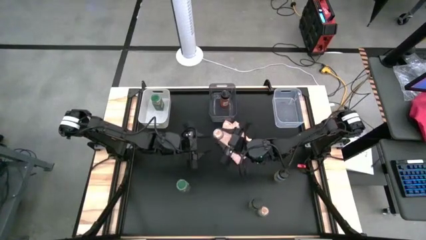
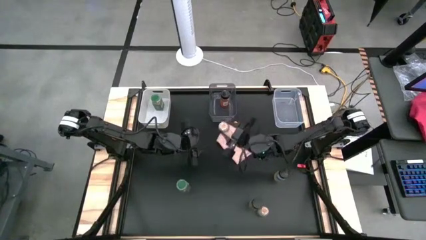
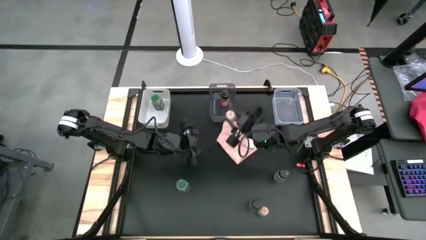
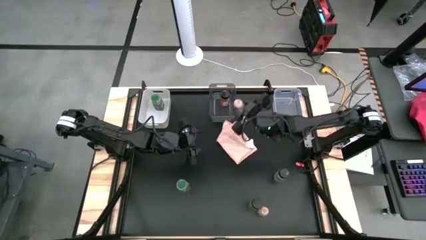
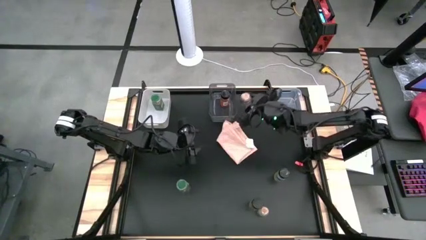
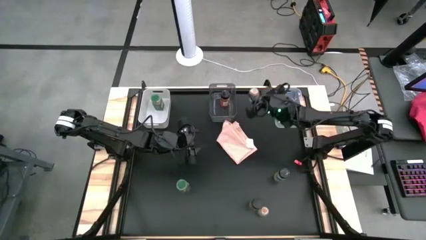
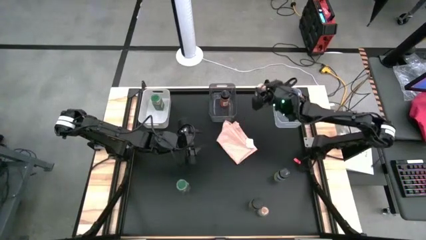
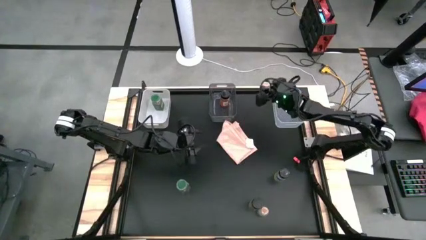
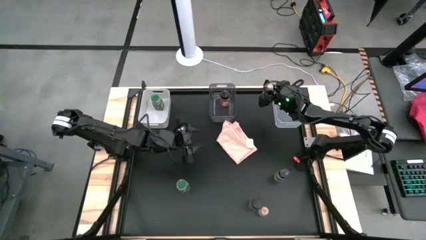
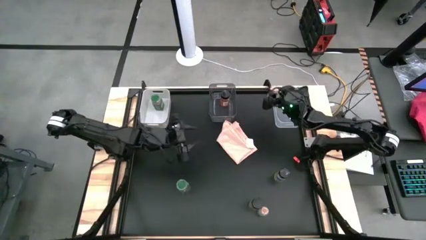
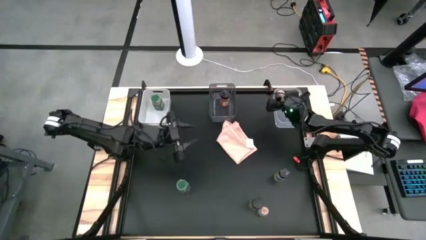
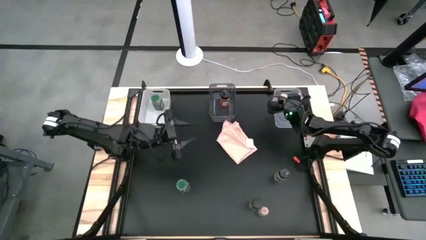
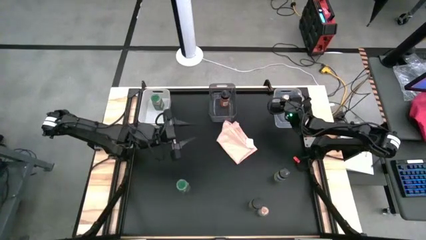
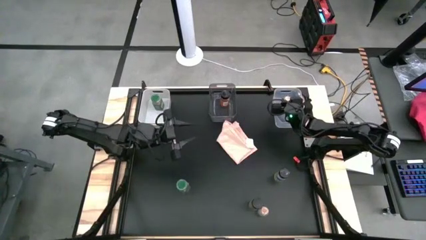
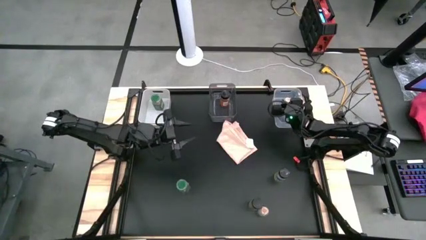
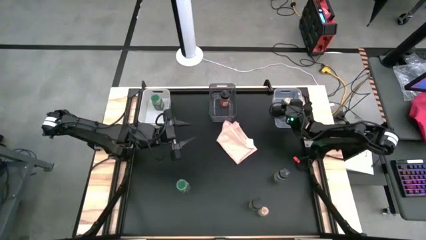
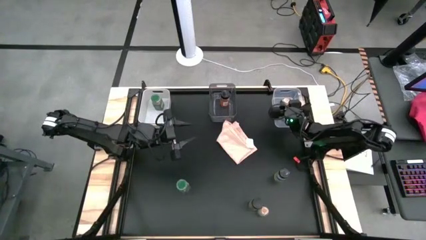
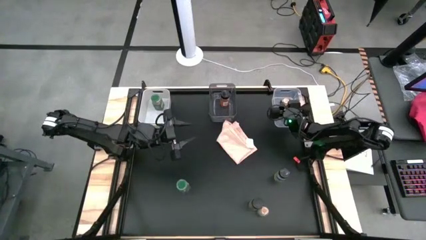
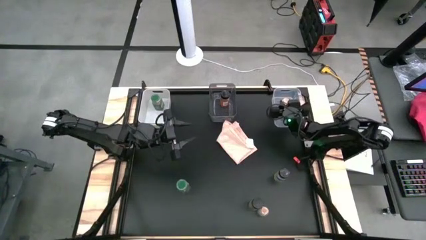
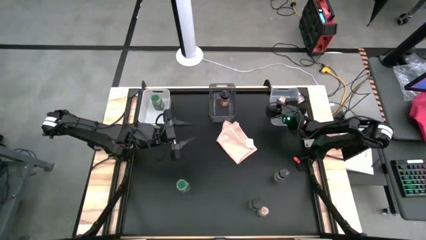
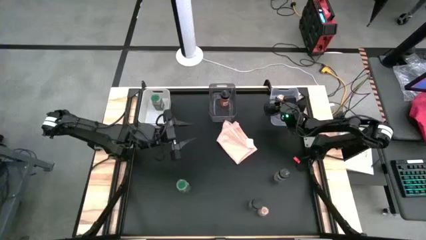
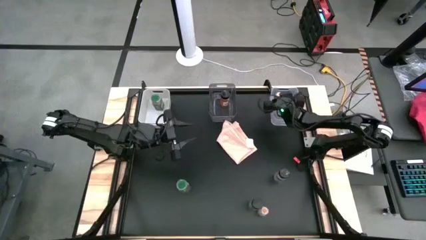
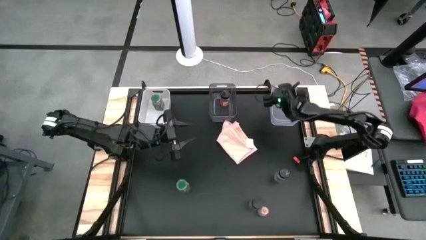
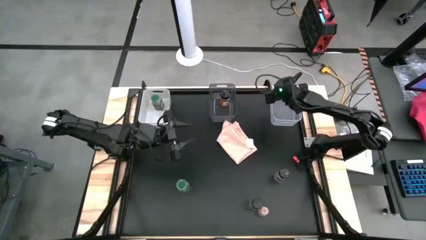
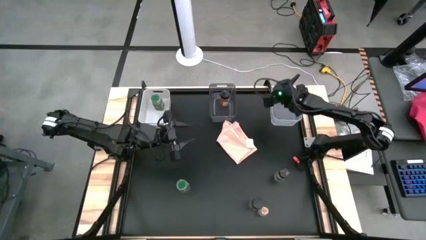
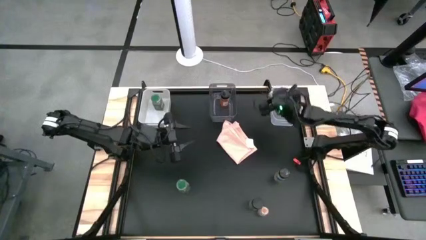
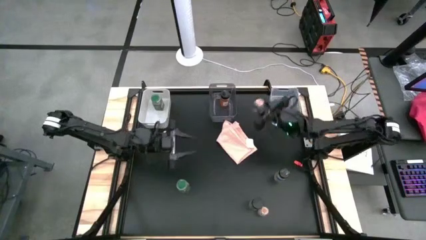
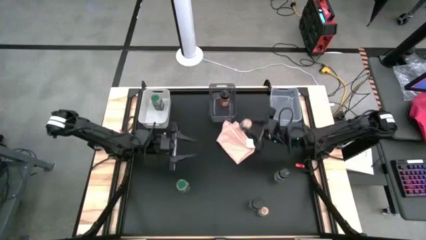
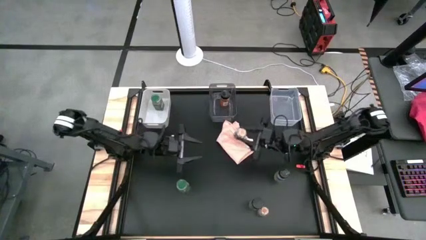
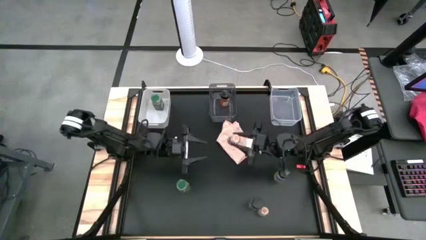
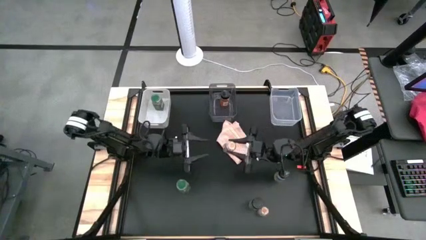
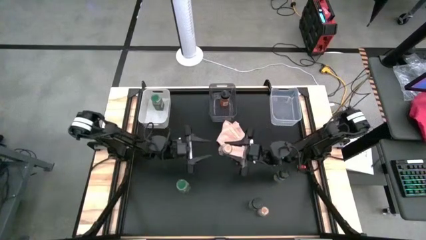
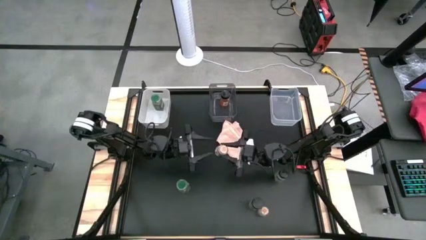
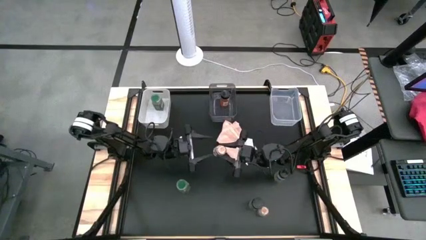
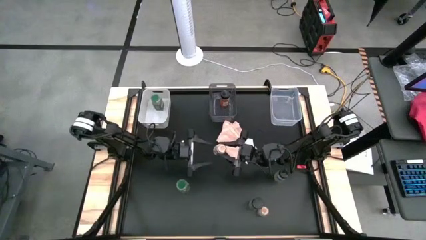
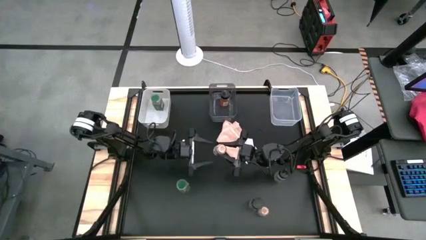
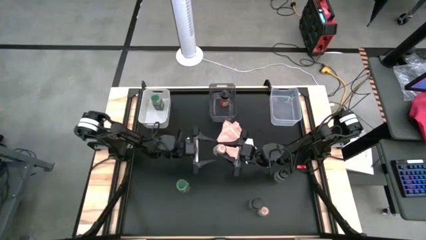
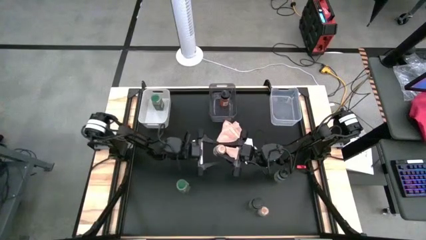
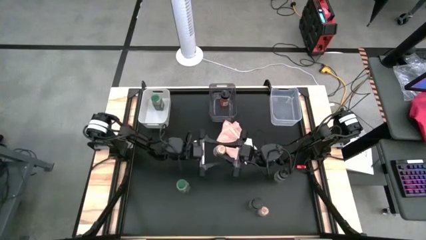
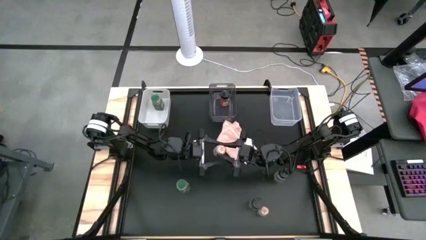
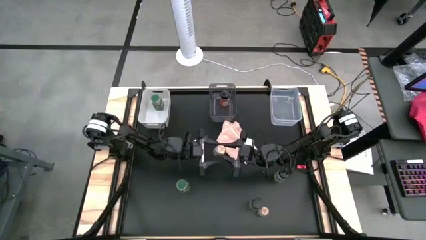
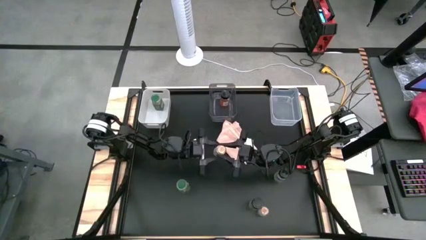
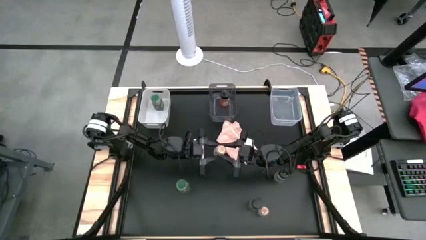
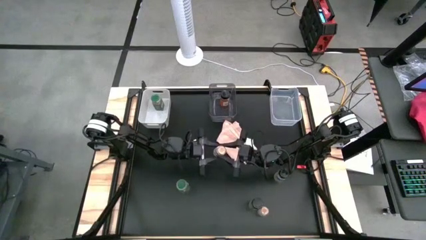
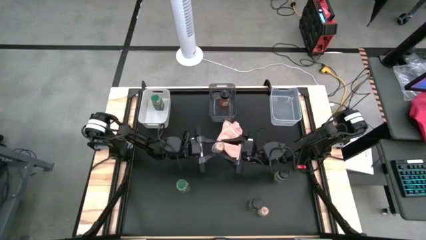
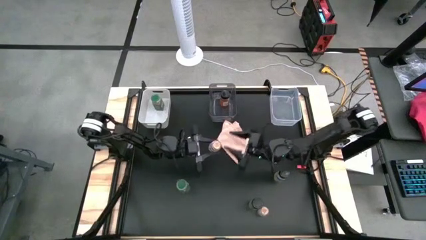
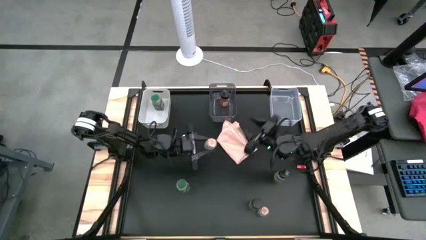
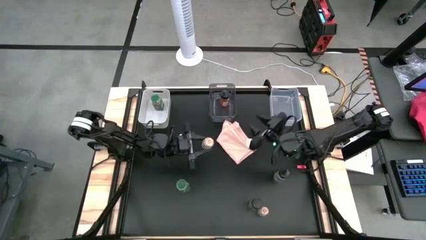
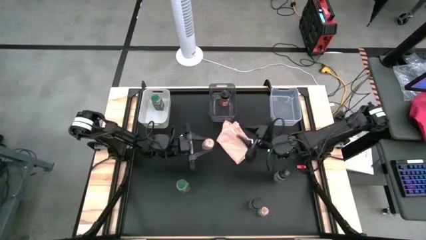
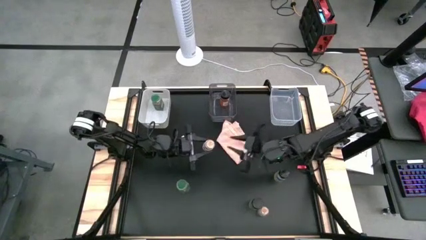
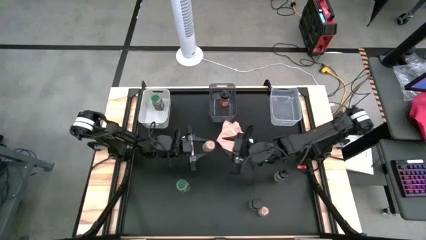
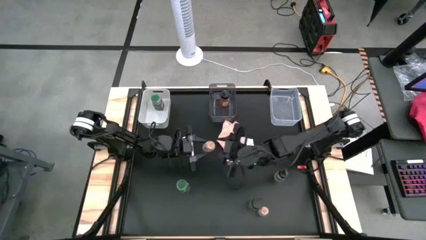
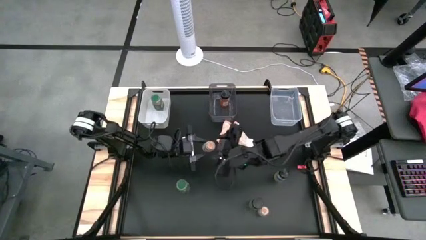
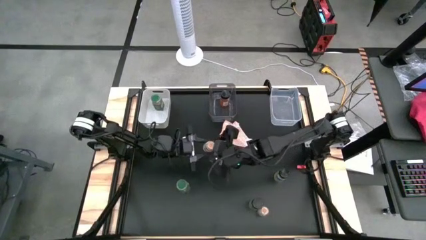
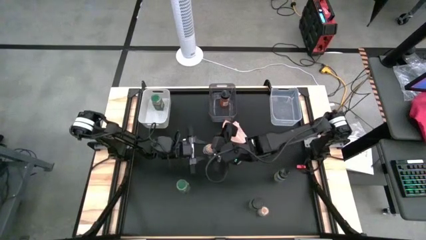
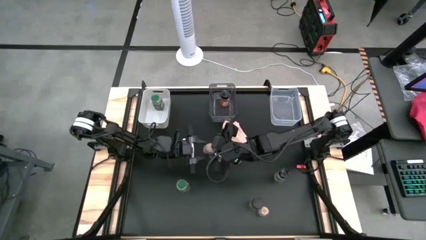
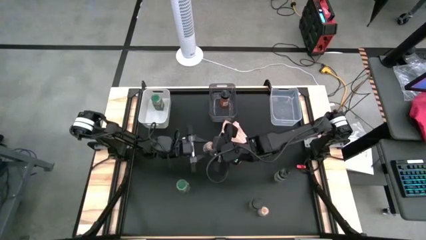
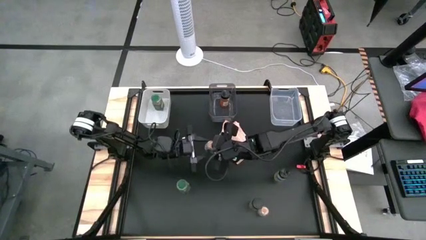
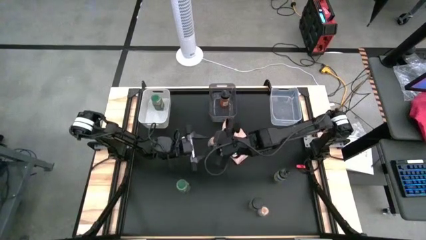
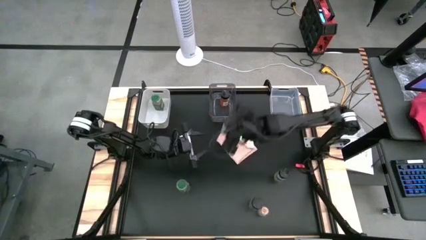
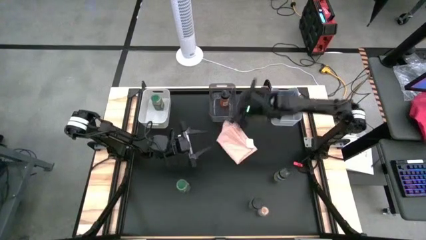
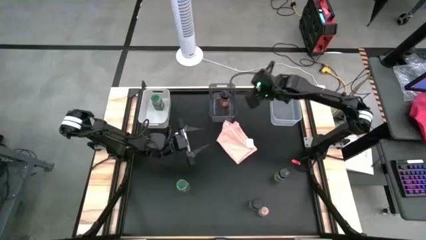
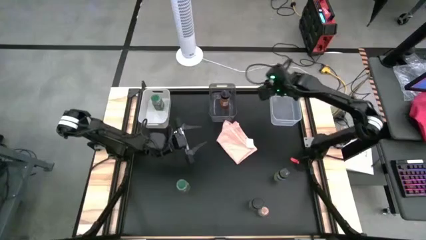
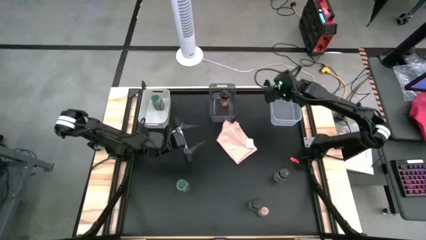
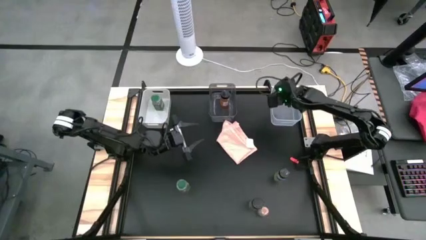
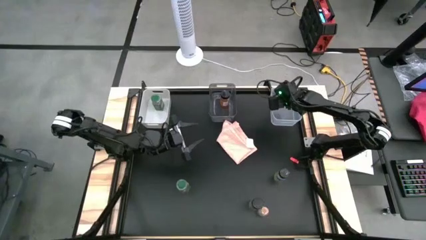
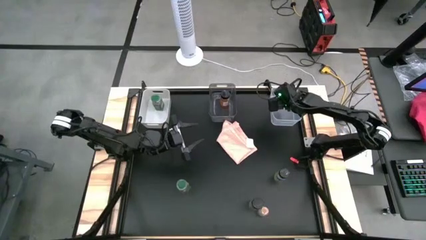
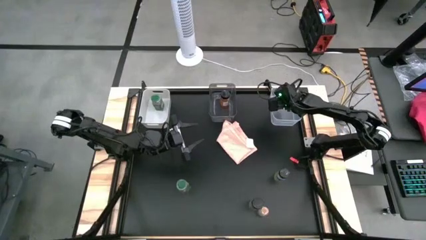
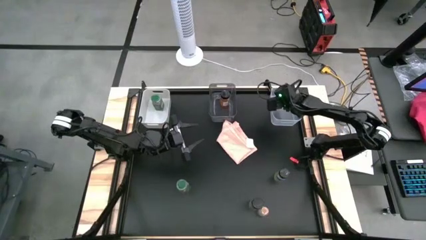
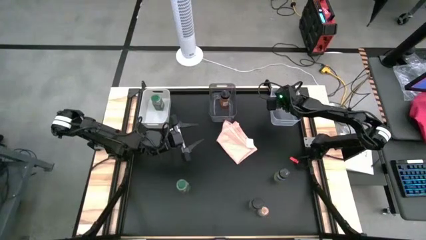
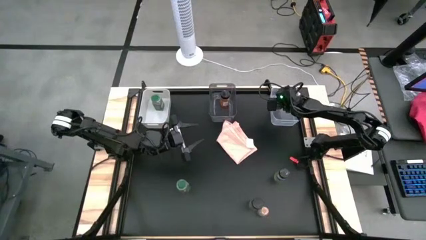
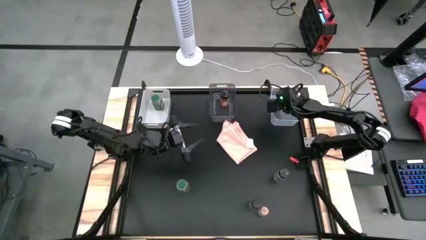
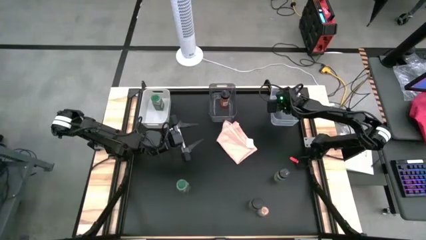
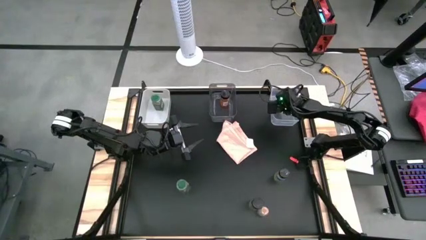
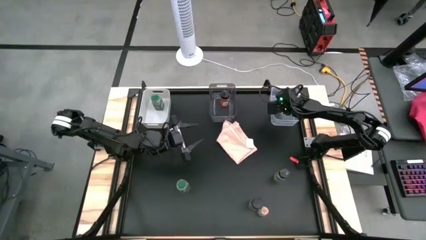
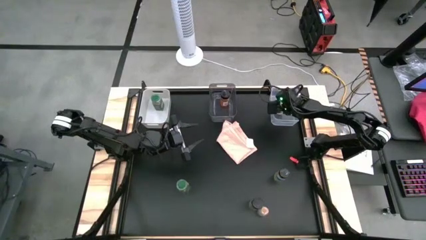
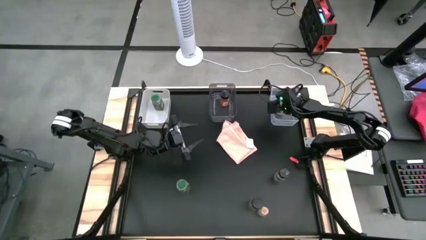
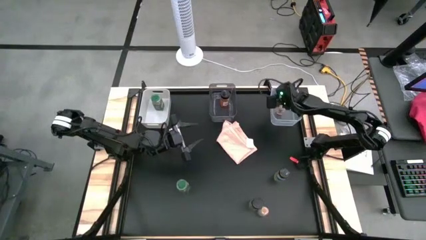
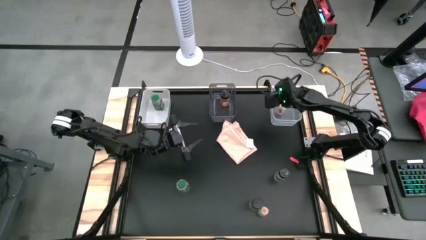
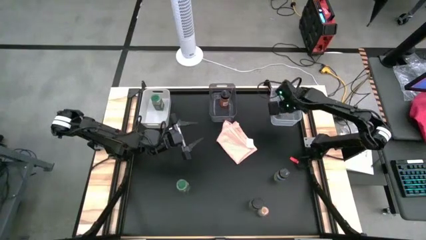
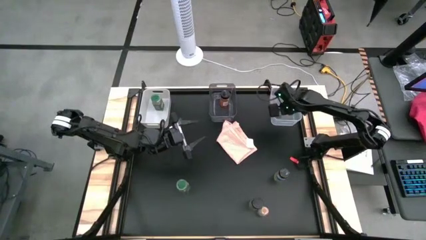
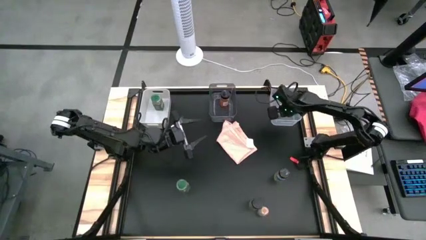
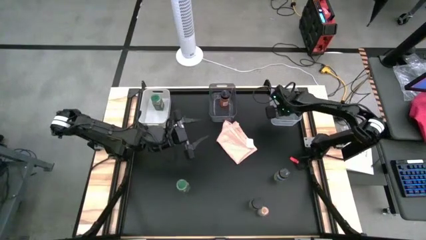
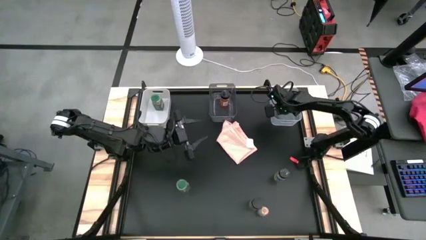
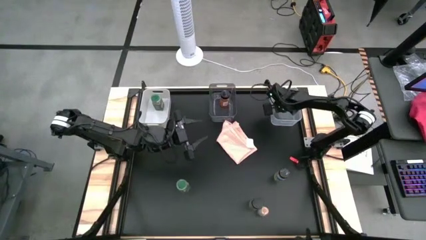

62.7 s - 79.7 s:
Task: Sort spices by type
Put the left brown seasoning bottle into the transparent bin
